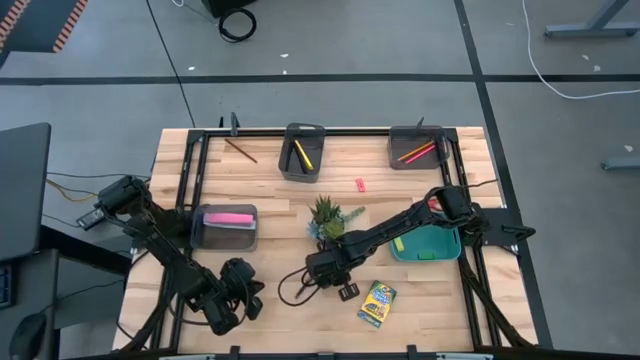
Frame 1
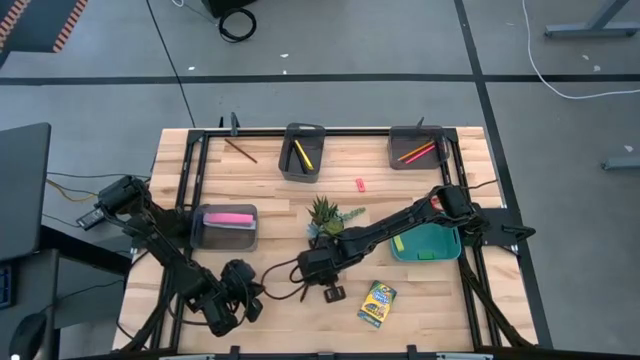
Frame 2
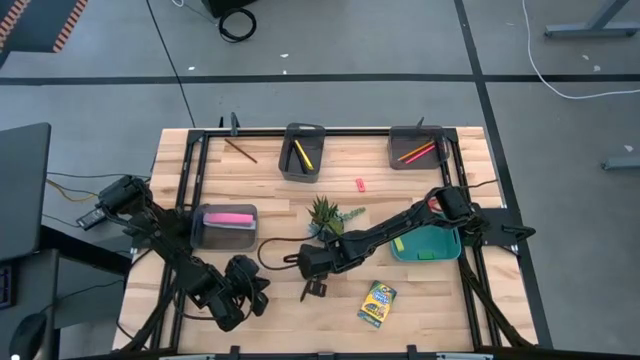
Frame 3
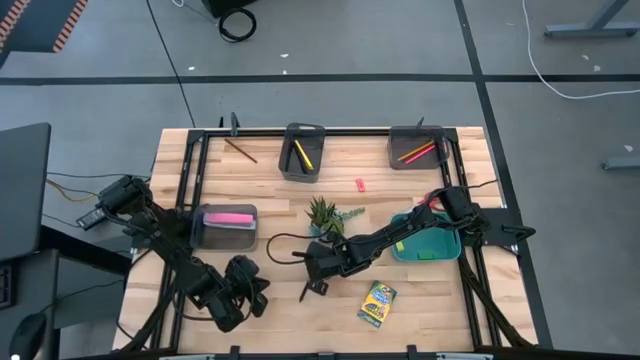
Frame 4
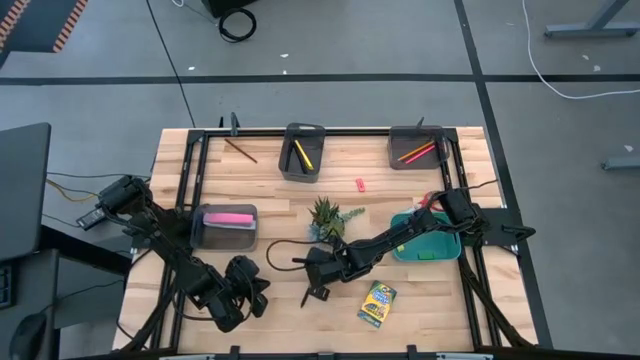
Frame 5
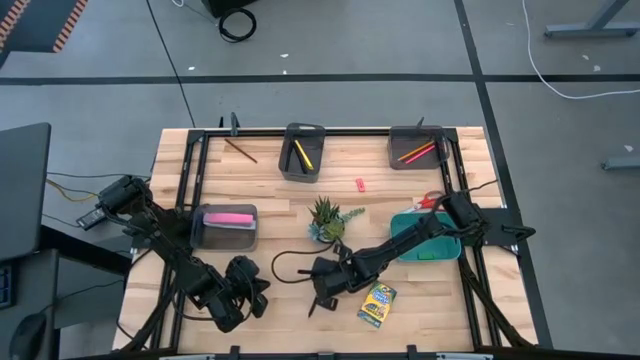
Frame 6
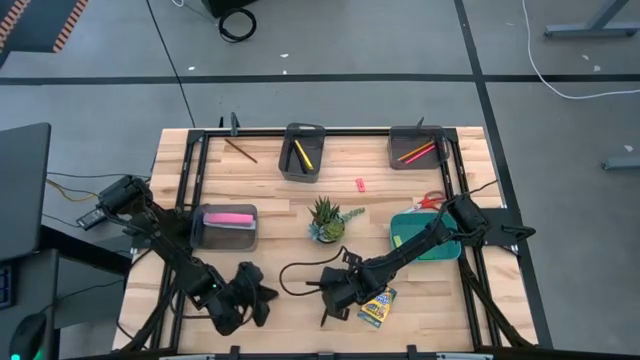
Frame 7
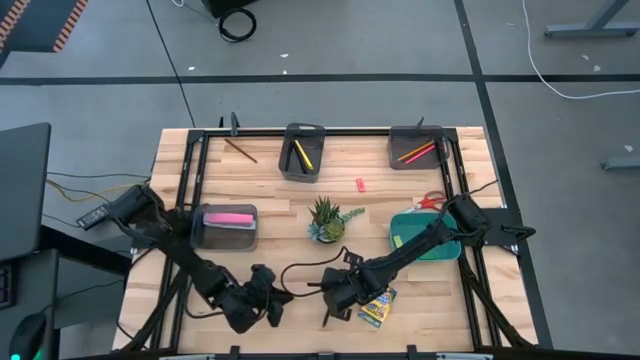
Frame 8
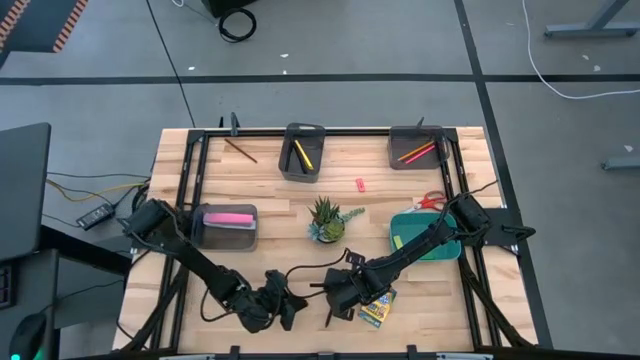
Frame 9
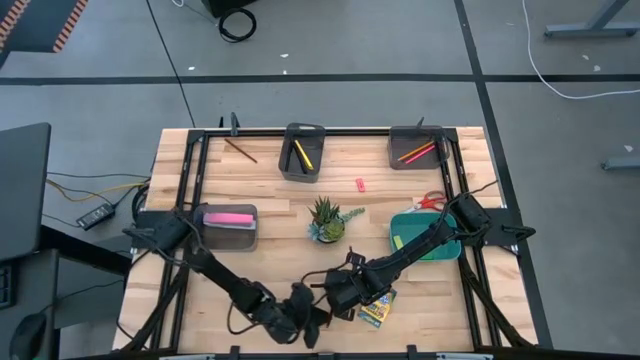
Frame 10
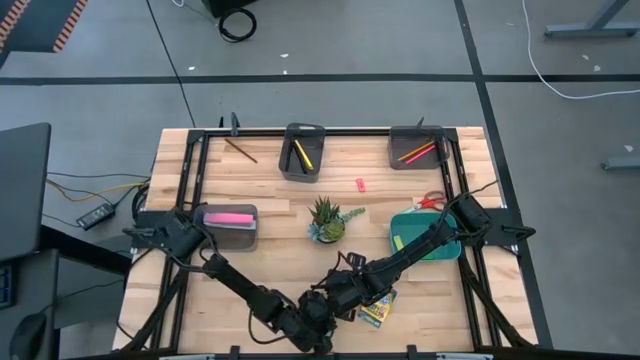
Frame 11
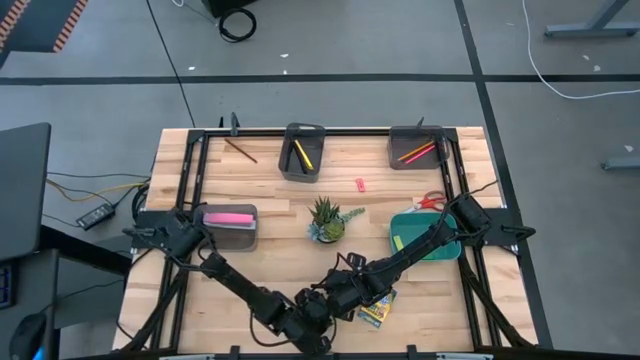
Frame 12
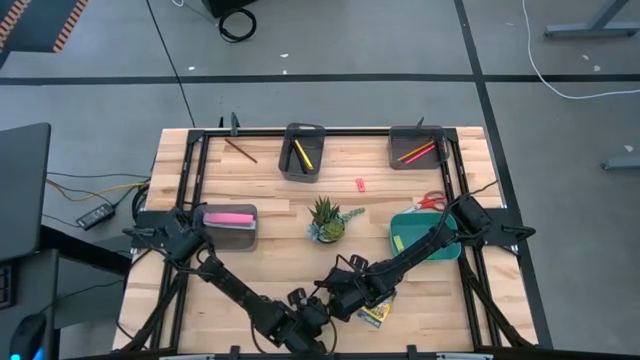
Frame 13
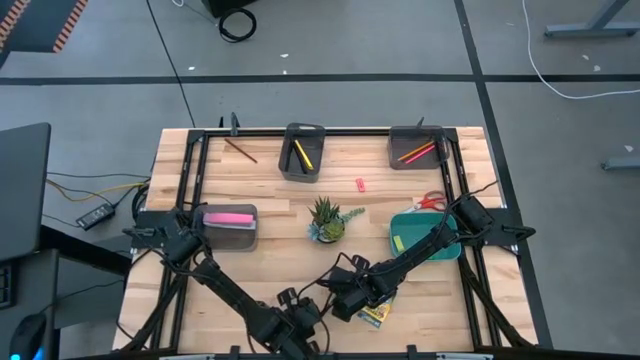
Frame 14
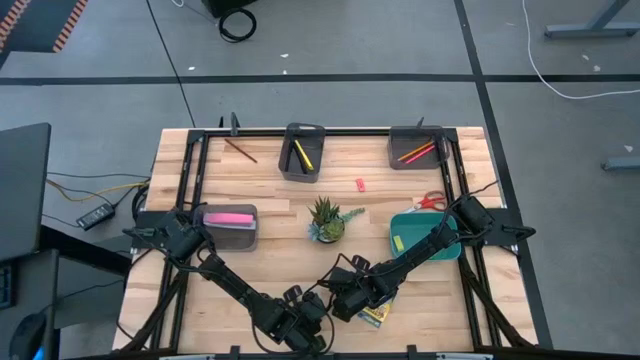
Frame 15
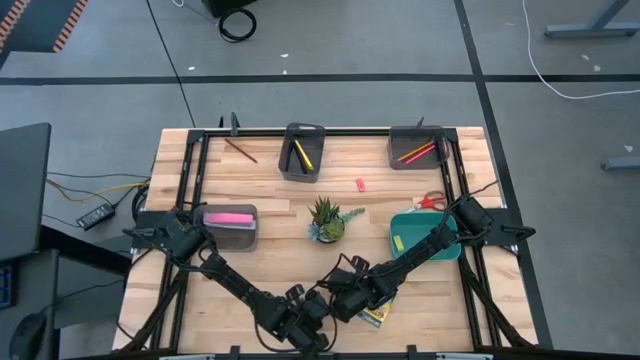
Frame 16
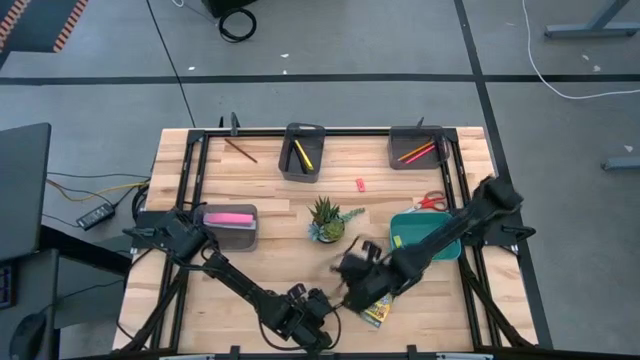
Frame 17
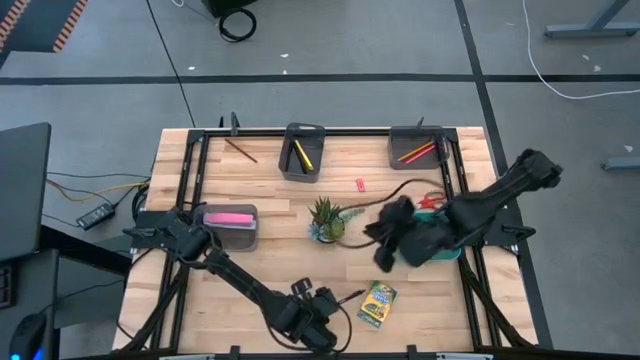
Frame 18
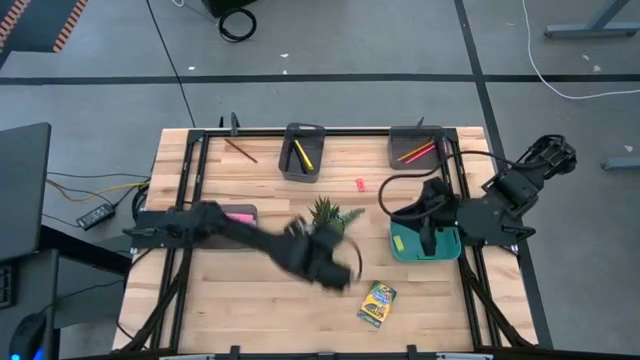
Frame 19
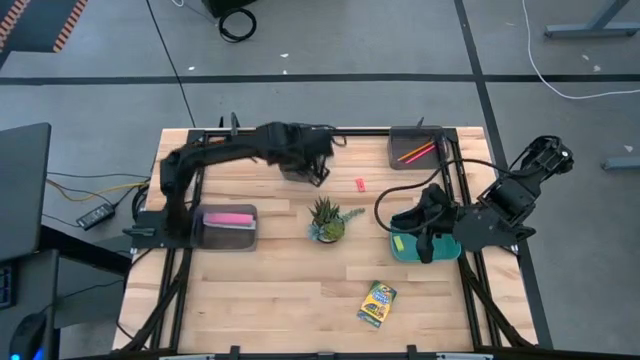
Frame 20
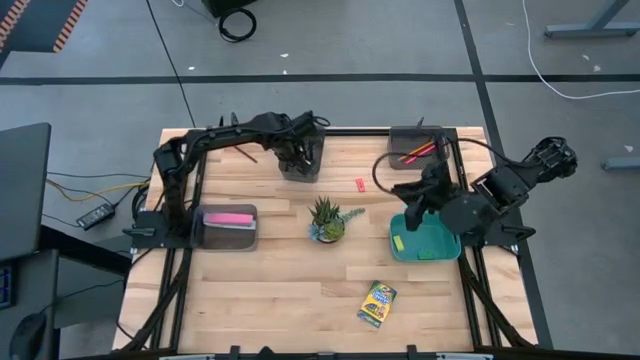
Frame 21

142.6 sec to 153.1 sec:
Task: Sort crayons/erasers/pens/pencils in bins
Put the black pen into the left black bin

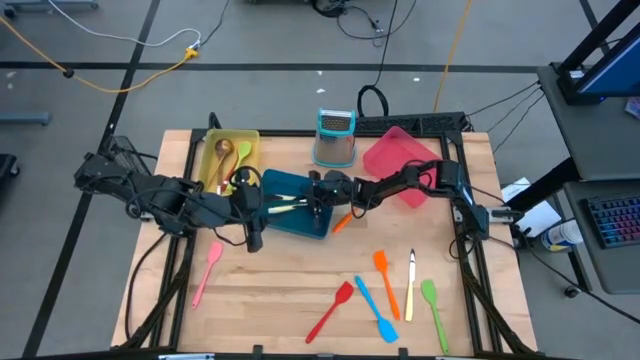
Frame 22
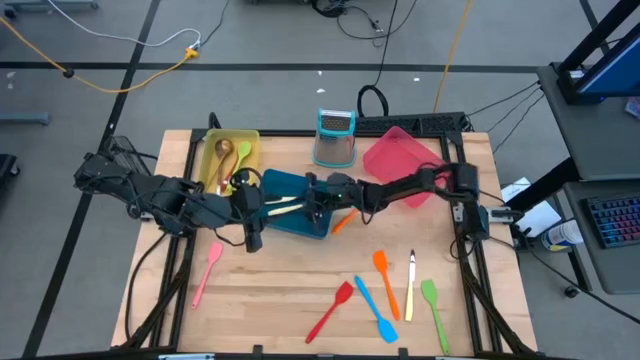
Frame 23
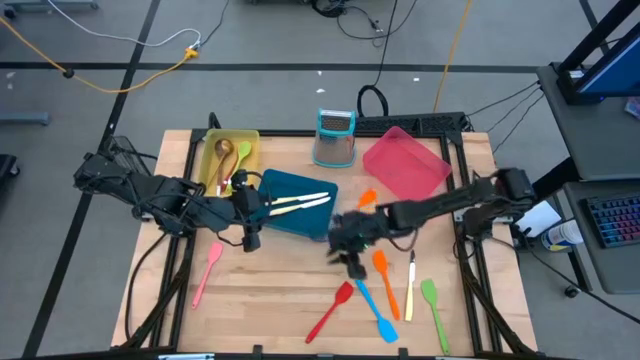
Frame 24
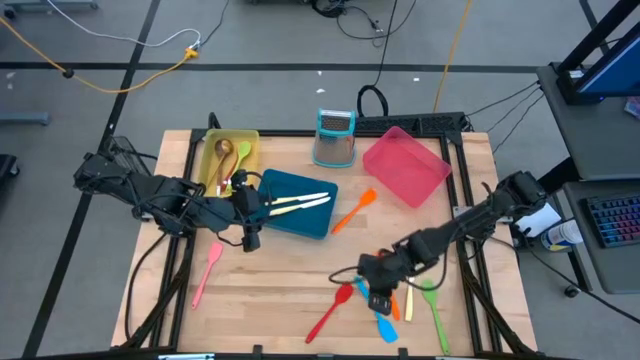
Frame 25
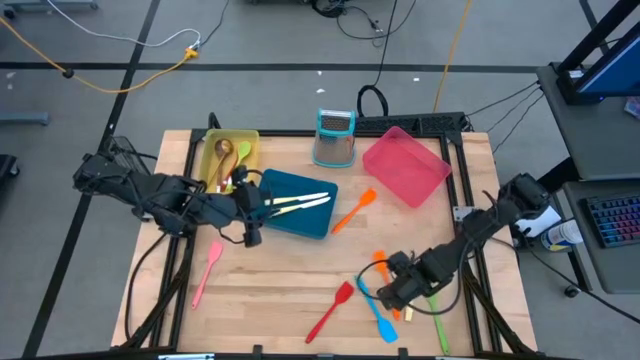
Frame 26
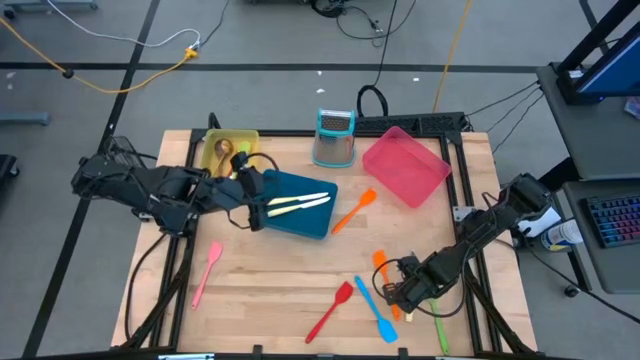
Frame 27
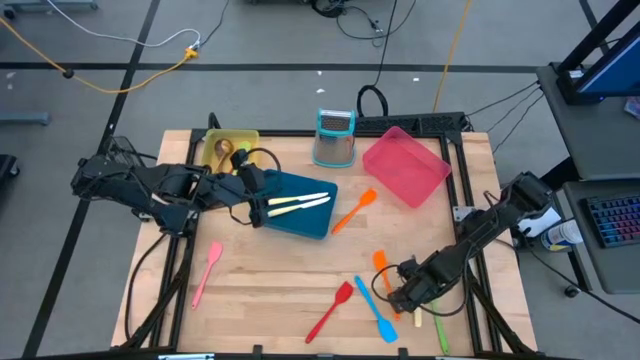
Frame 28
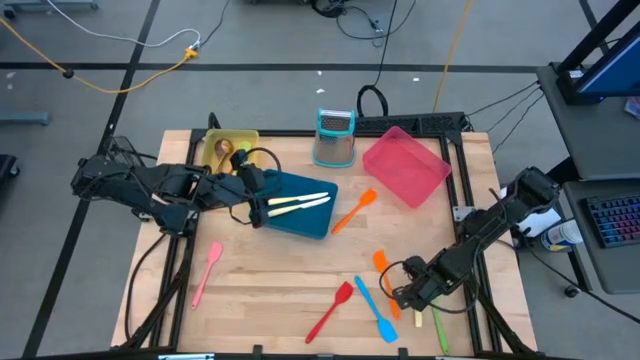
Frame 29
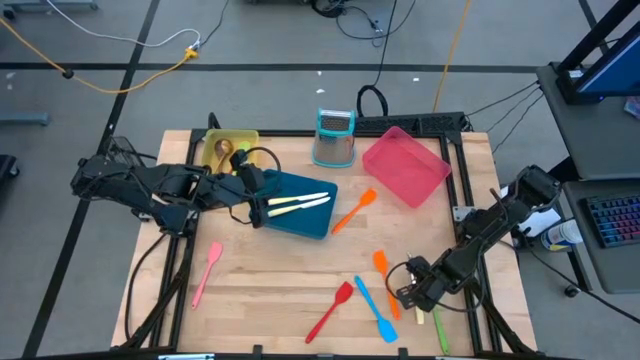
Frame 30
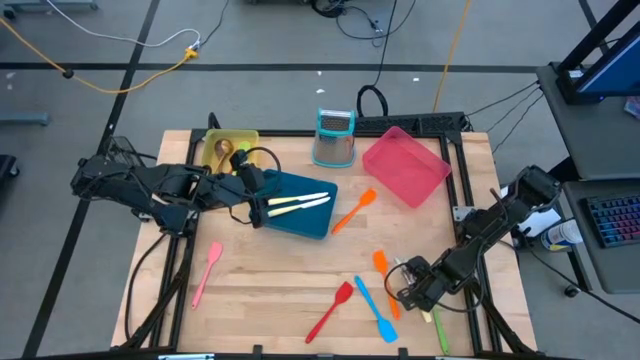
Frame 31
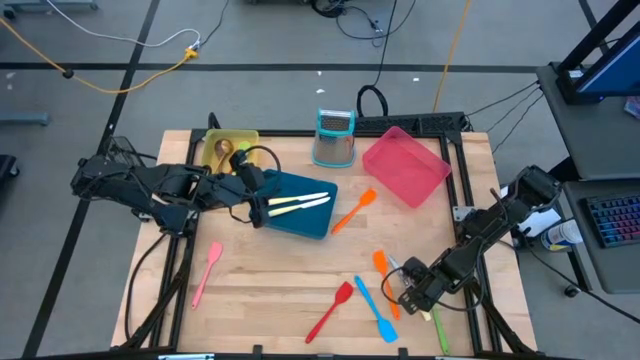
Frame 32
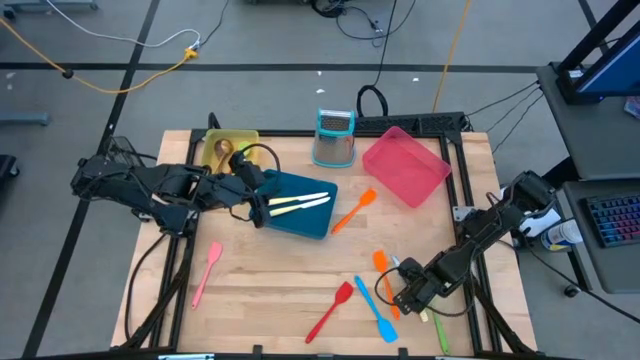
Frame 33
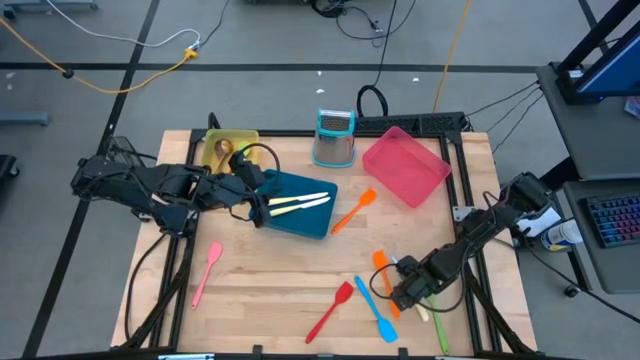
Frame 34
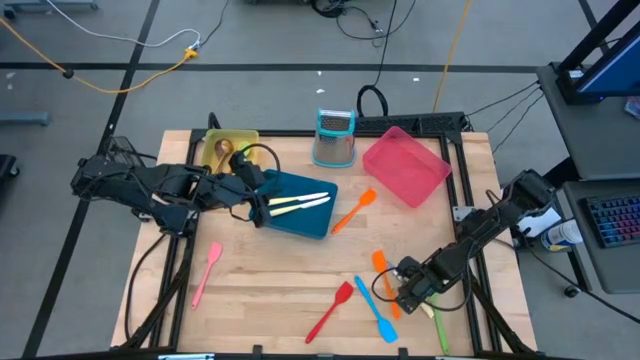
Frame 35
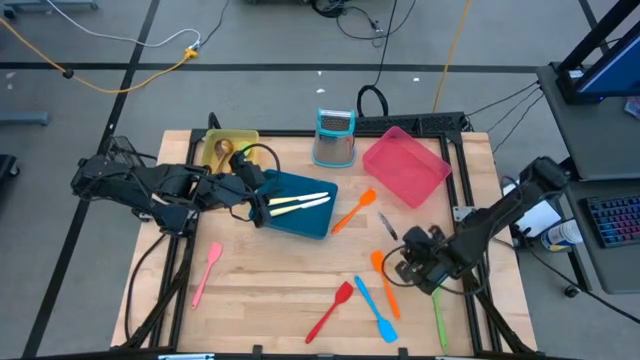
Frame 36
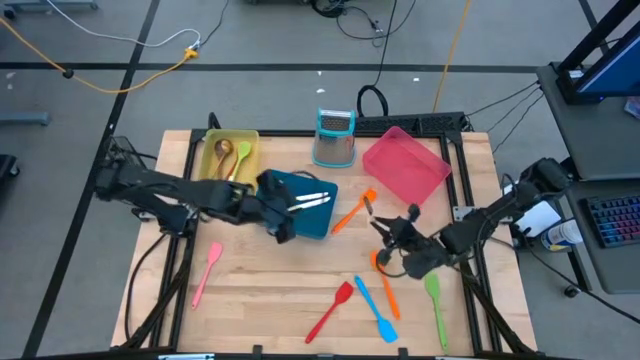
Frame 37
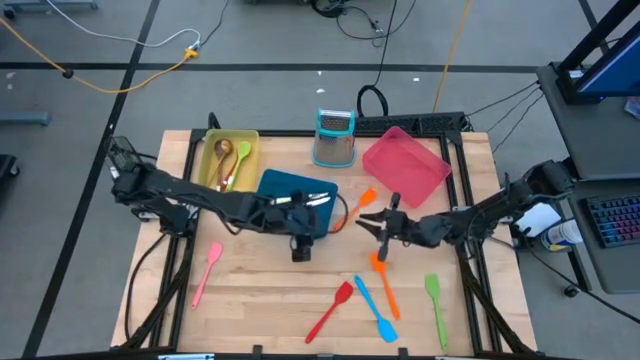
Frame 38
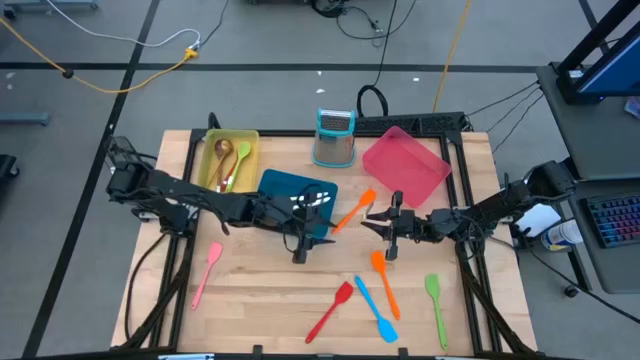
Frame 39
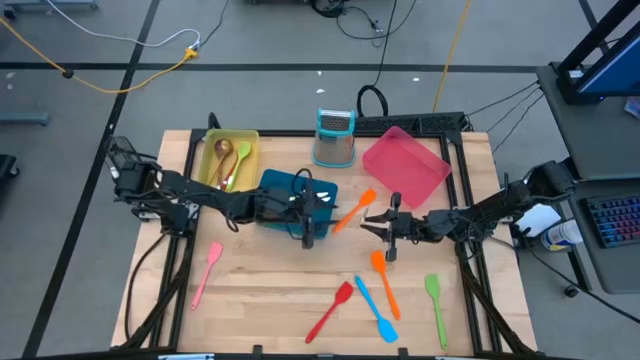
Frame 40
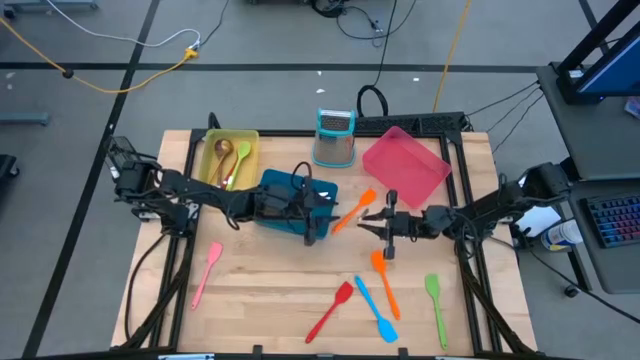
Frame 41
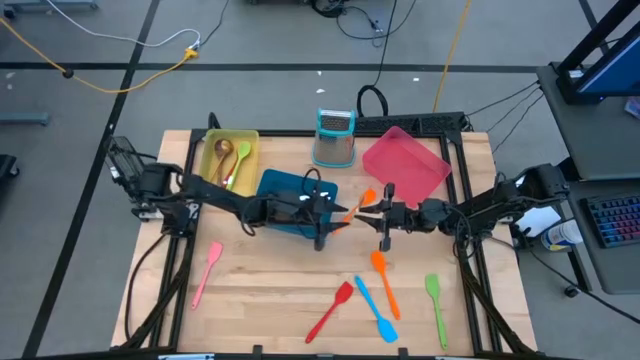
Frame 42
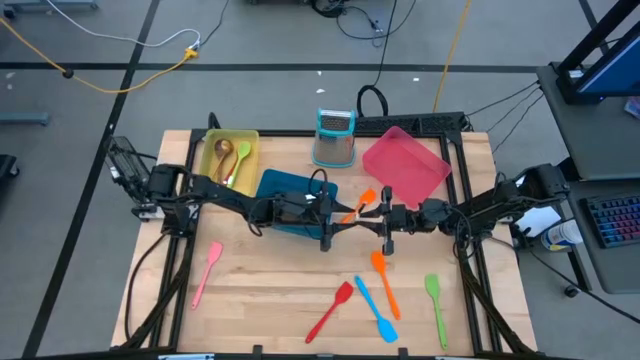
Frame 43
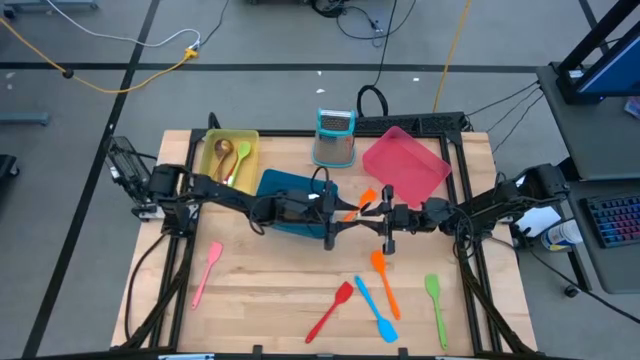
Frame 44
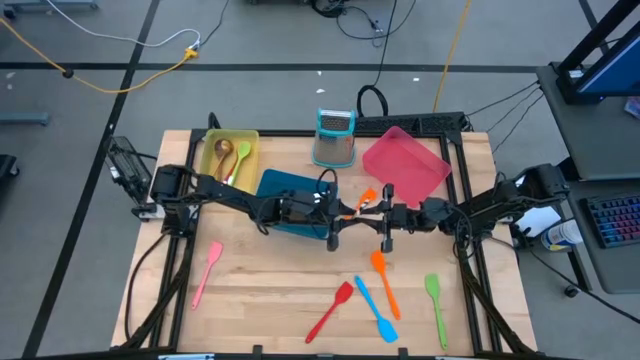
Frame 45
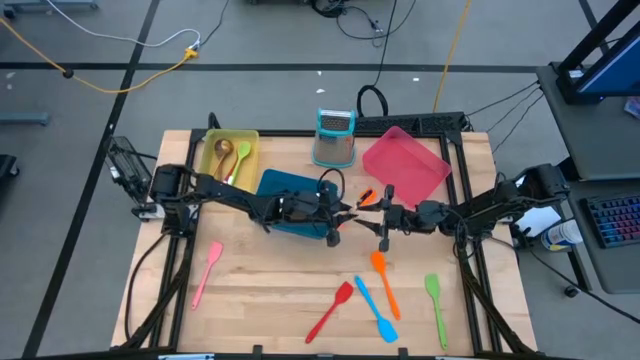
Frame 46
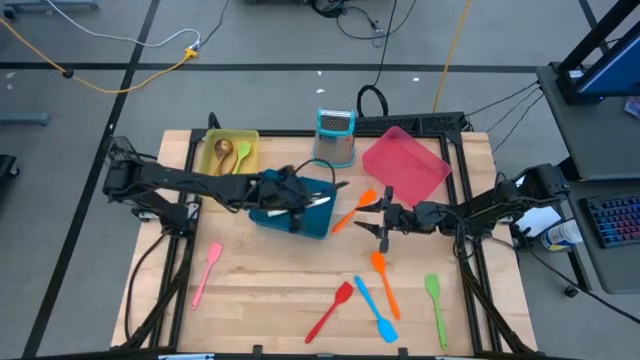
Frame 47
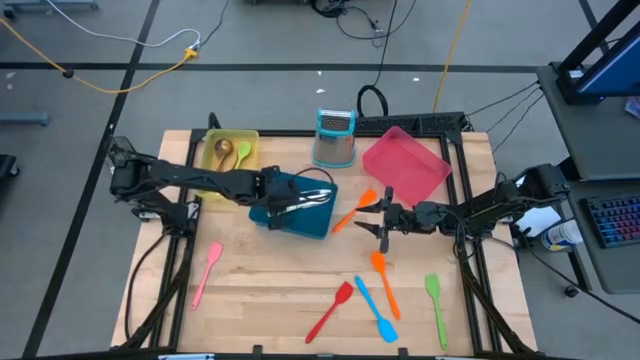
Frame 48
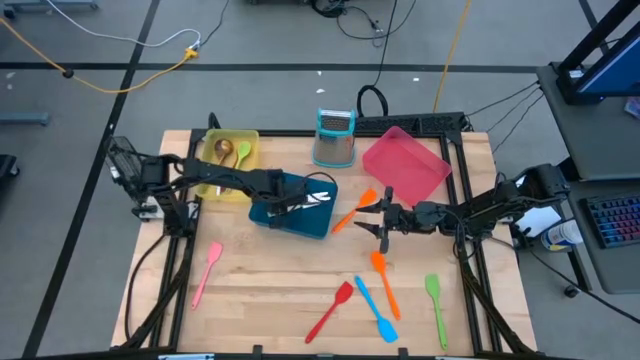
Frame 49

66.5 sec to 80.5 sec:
Task: Pick & Place Kitchen Items
Put the yellow table knife into the blue bin
